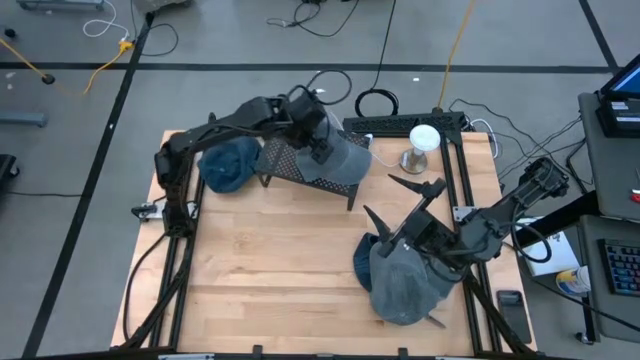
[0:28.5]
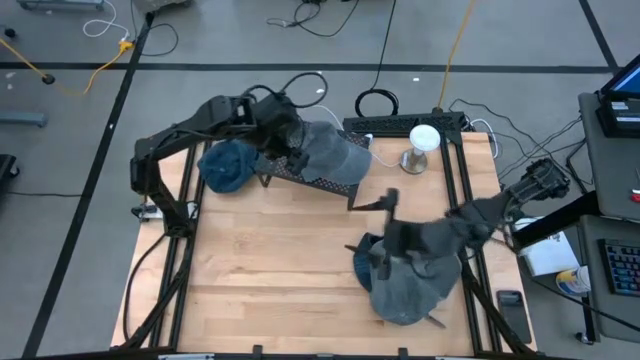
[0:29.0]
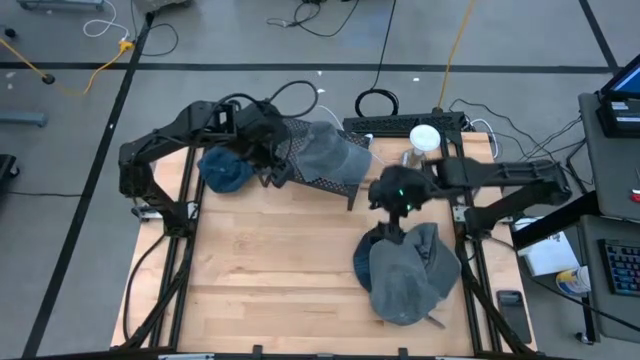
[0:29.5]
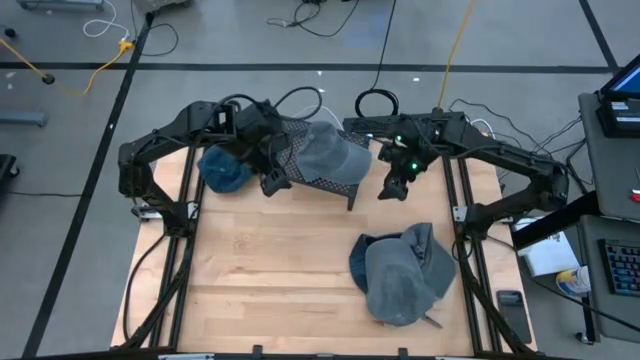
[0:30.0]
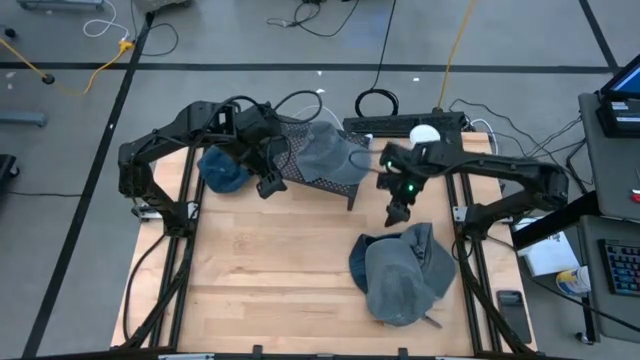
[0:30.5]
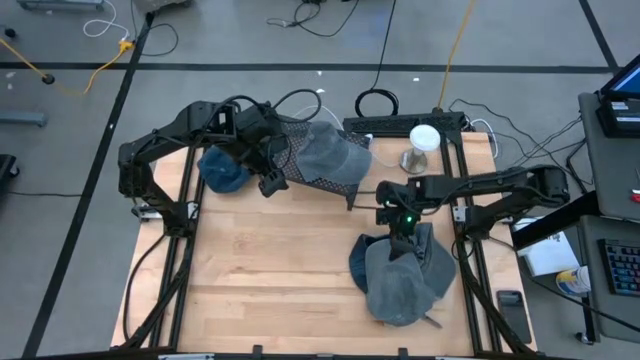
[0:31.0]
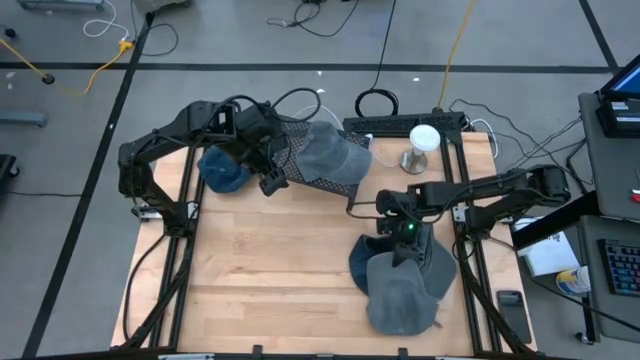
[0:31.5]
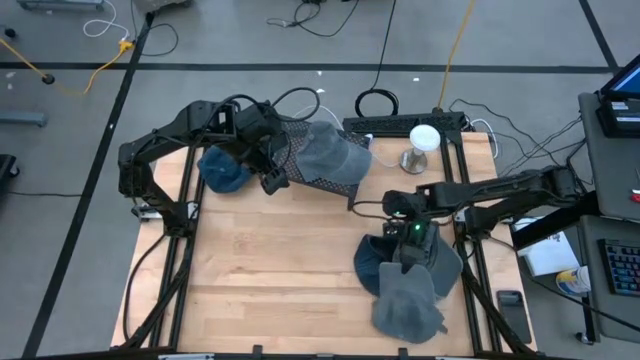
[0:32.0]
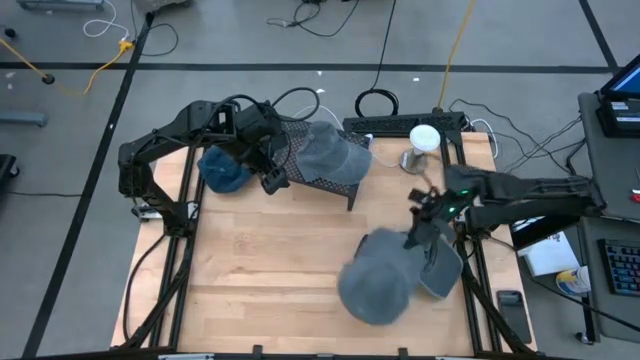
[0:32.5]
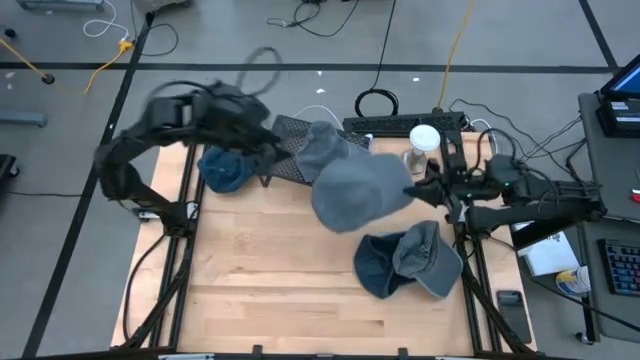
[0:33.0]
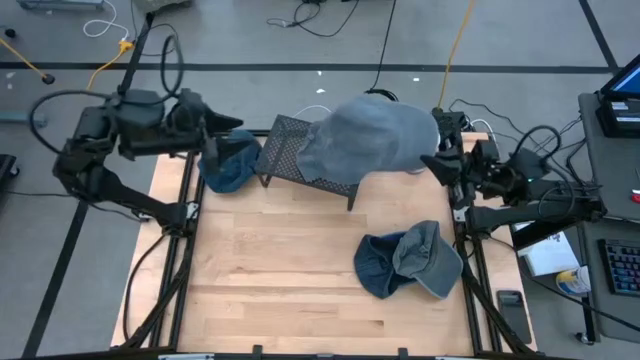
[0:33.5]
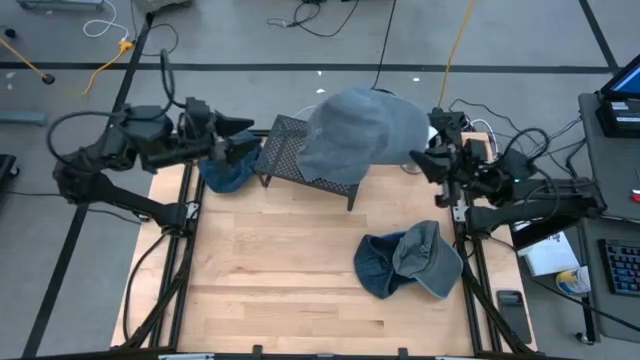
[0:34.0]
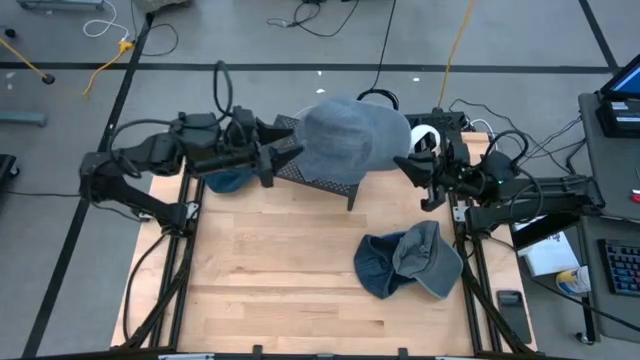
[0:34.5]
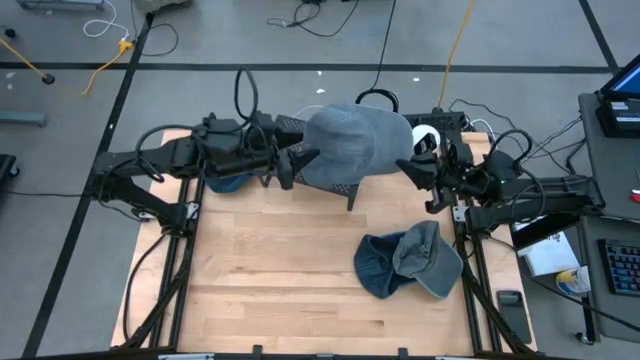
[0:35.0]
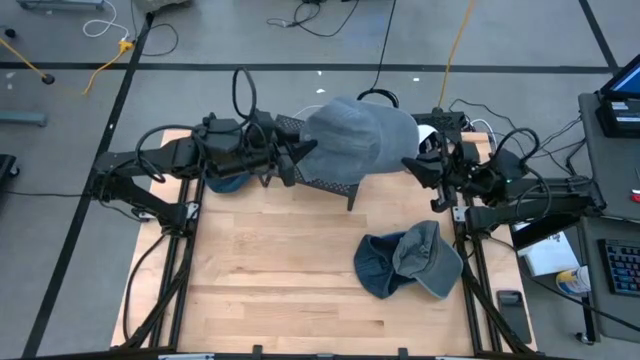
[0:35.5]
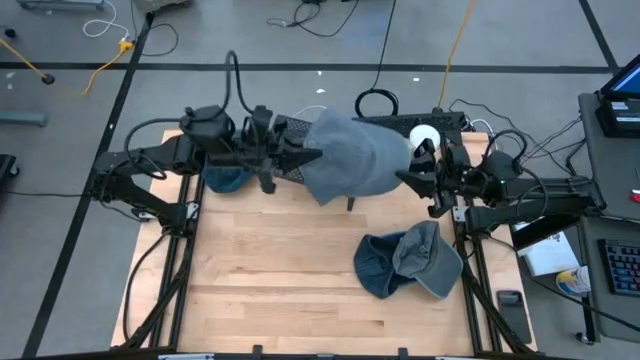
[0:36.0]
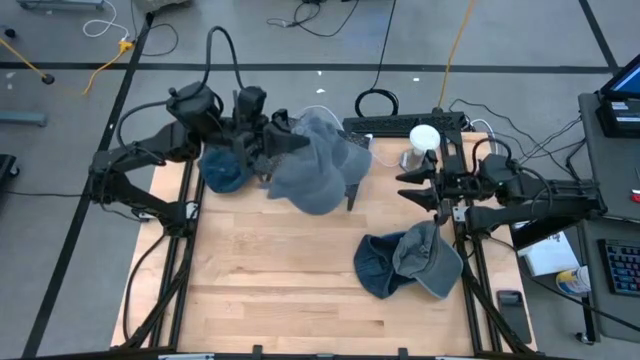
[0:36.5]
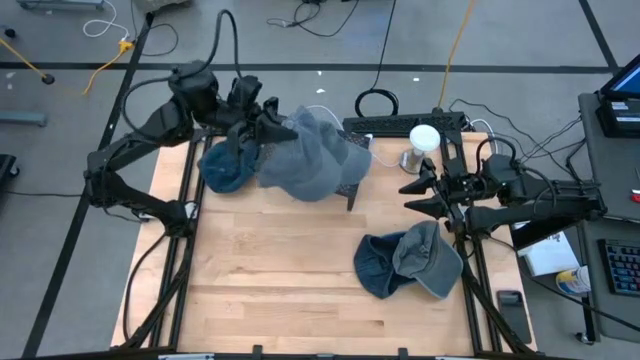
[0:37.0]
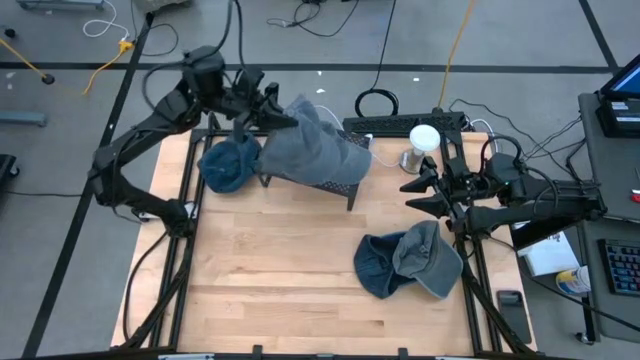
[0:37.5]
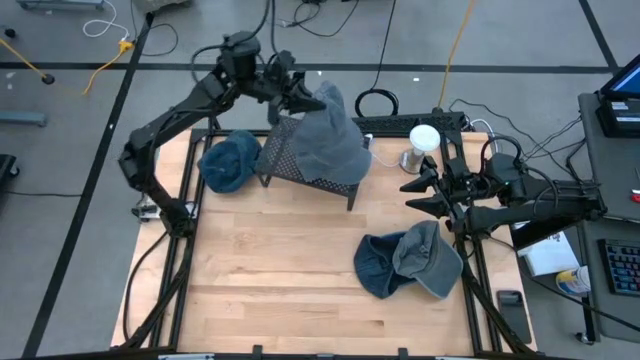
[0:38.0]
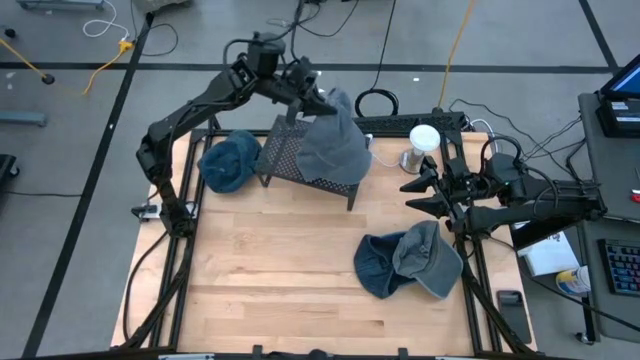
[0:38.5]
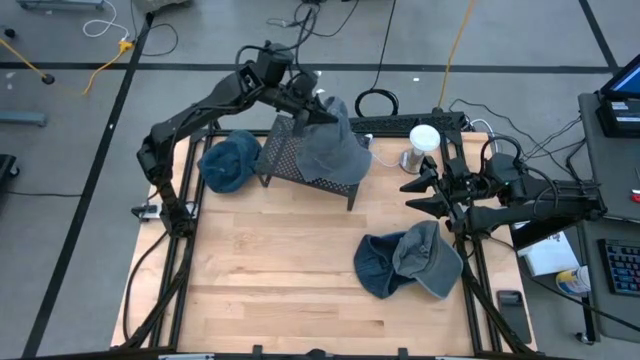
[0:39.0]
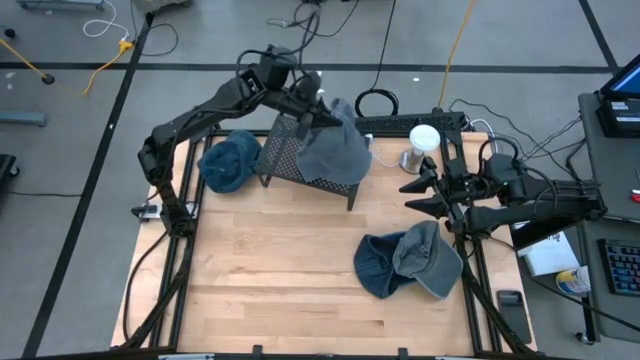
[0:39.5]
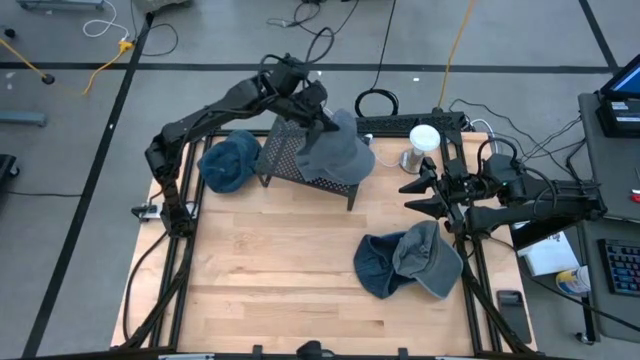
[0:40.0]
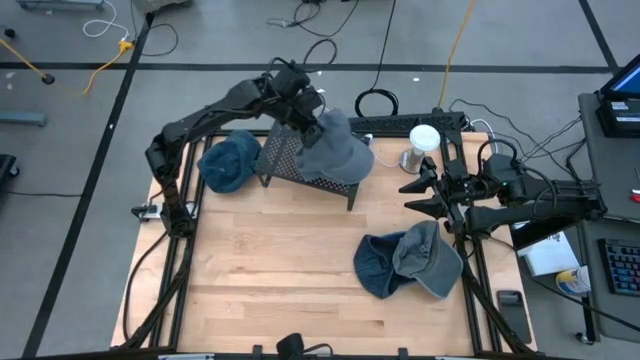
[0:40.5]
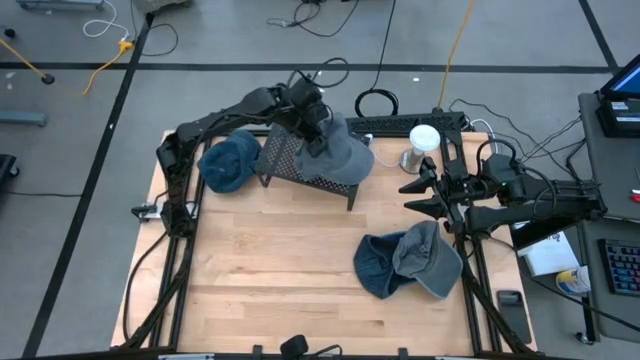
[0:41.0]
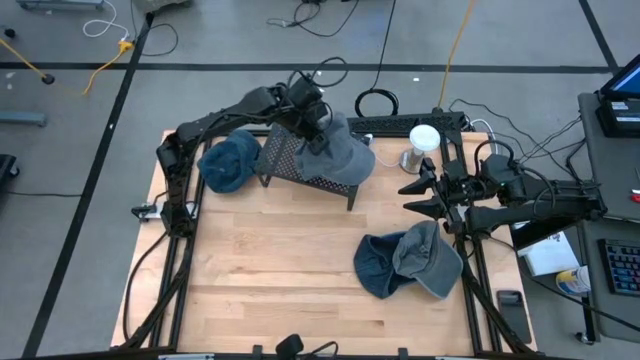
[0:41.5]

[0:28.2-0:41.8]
Task: Pick & Place hat
Stack the gray cap on the gray cap on the shelf
